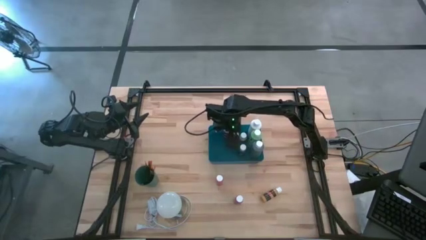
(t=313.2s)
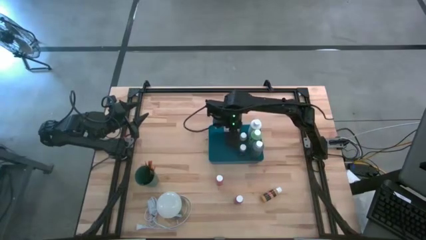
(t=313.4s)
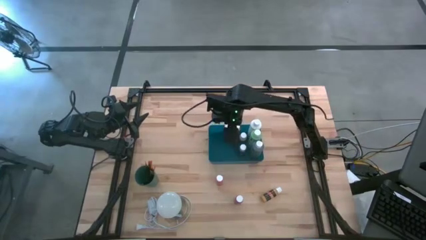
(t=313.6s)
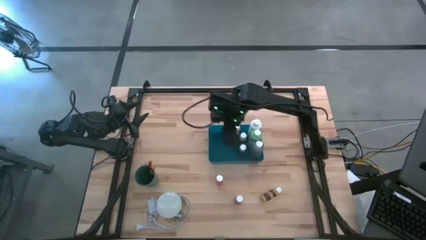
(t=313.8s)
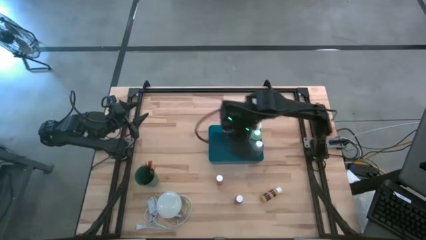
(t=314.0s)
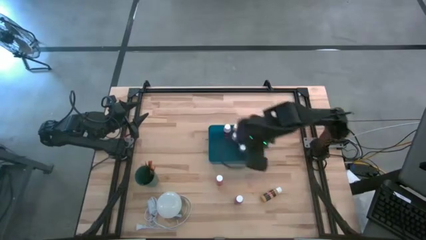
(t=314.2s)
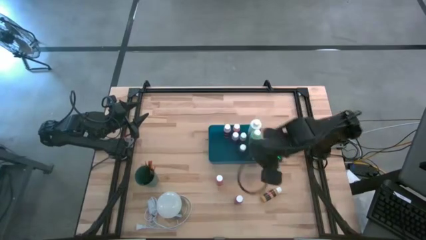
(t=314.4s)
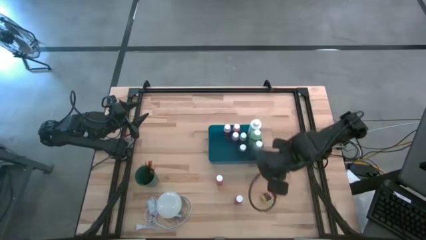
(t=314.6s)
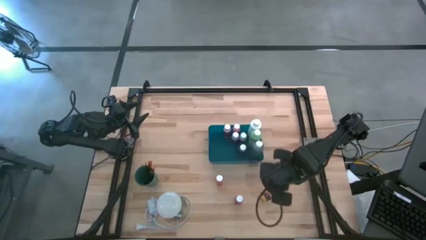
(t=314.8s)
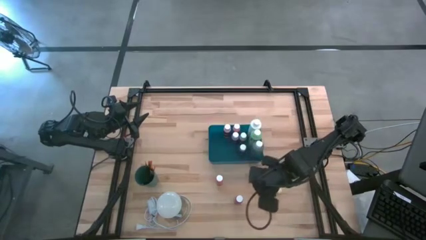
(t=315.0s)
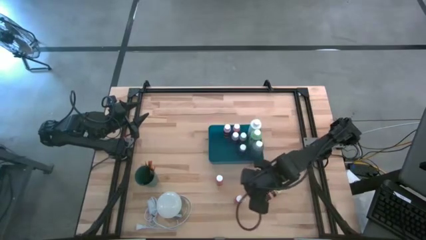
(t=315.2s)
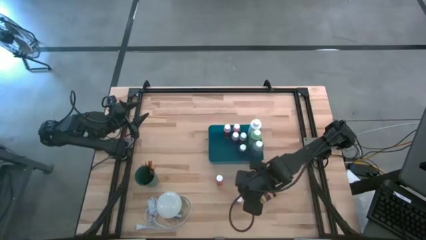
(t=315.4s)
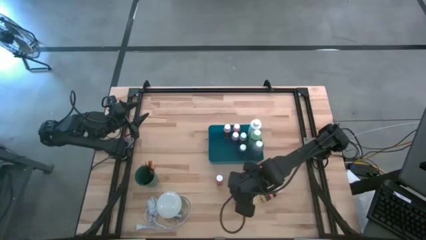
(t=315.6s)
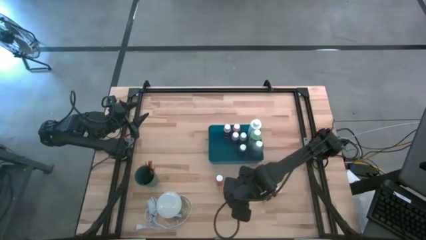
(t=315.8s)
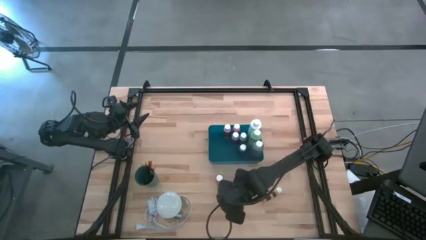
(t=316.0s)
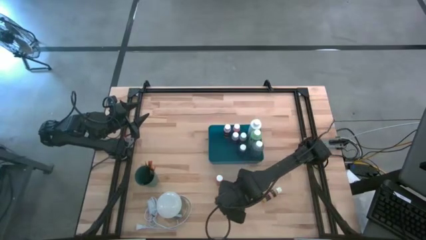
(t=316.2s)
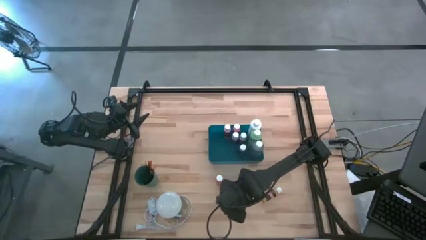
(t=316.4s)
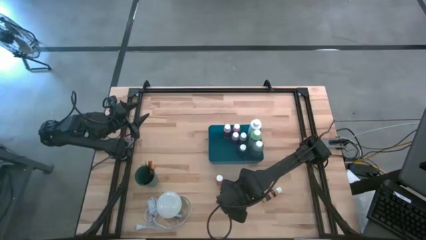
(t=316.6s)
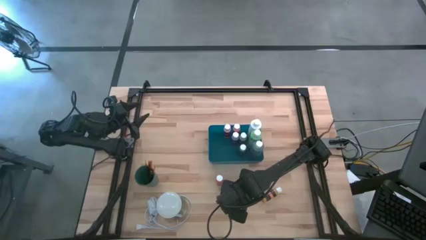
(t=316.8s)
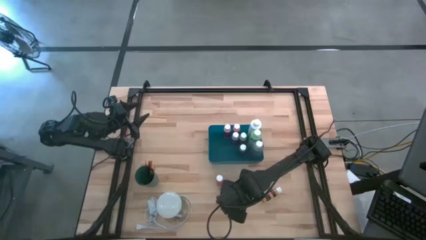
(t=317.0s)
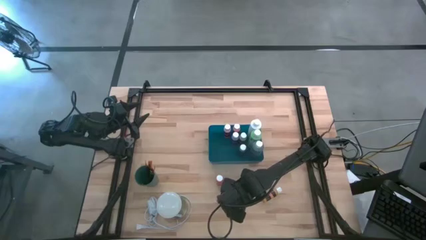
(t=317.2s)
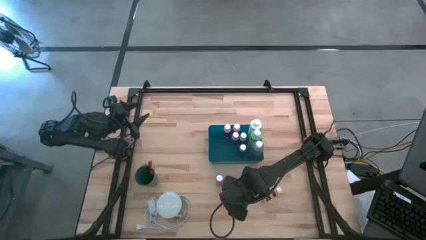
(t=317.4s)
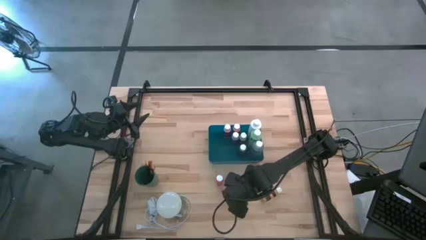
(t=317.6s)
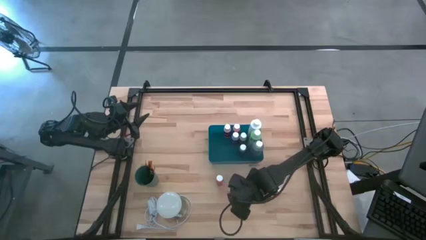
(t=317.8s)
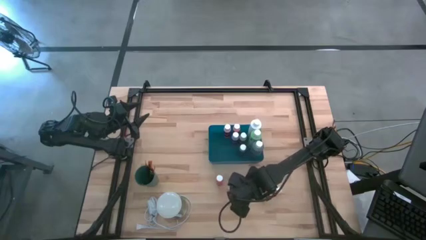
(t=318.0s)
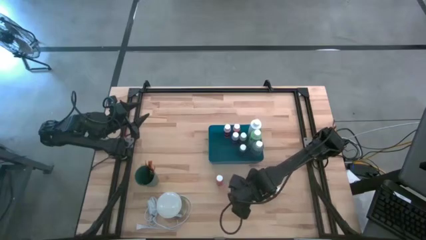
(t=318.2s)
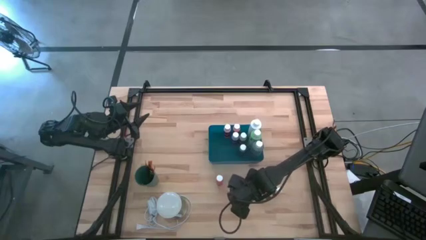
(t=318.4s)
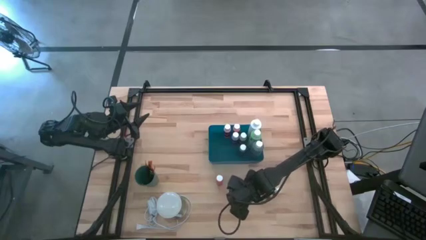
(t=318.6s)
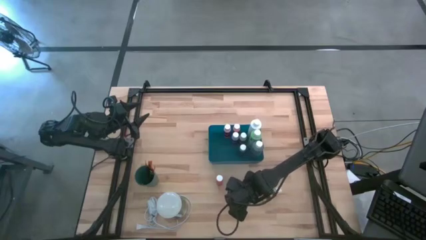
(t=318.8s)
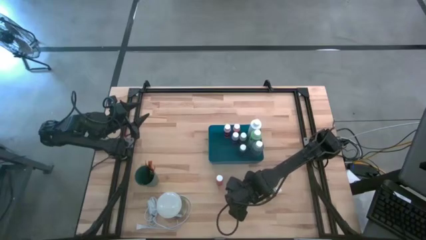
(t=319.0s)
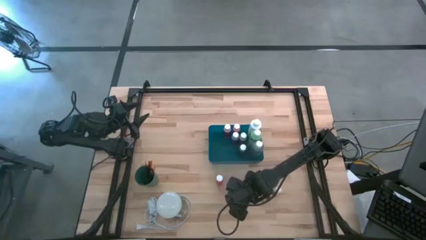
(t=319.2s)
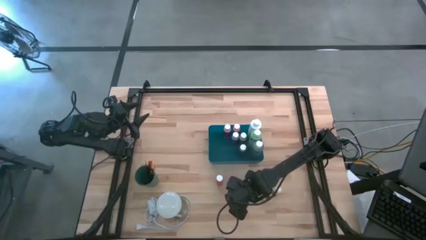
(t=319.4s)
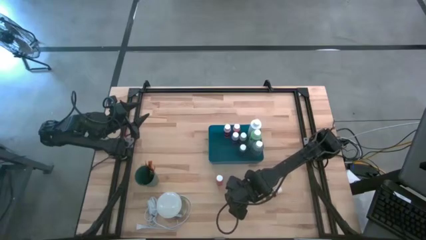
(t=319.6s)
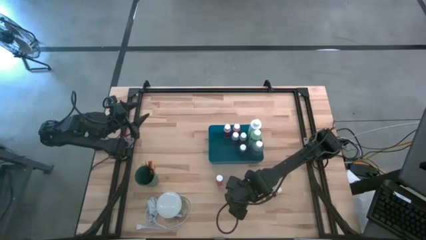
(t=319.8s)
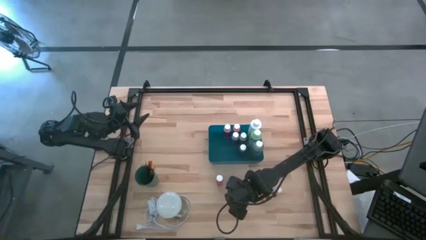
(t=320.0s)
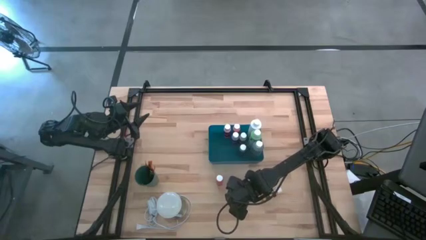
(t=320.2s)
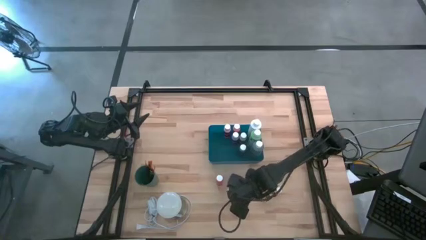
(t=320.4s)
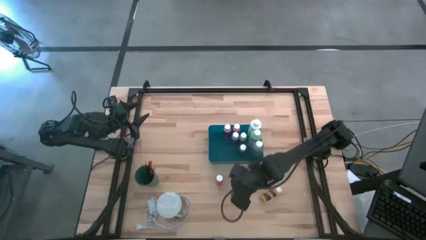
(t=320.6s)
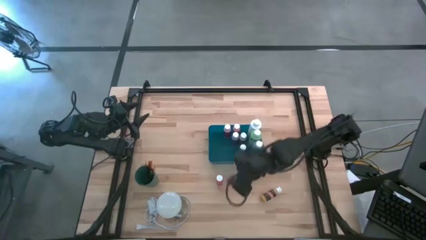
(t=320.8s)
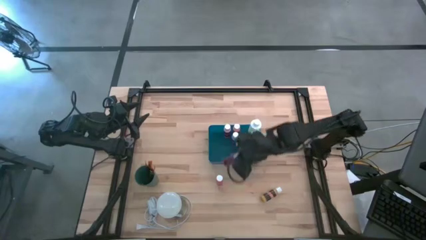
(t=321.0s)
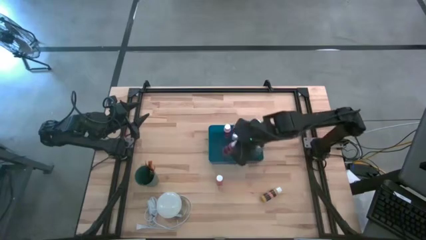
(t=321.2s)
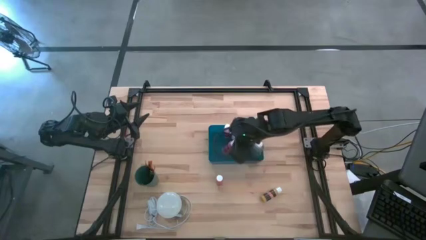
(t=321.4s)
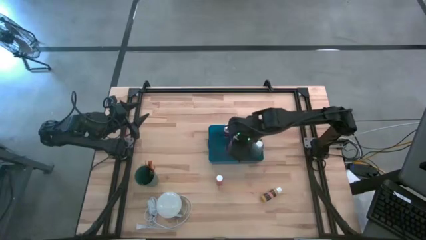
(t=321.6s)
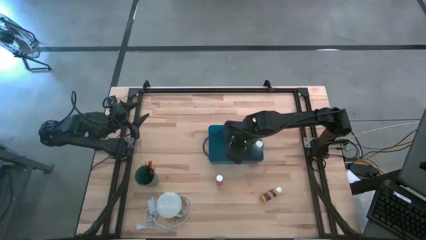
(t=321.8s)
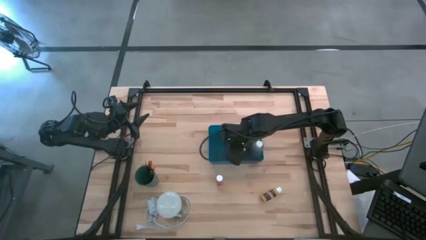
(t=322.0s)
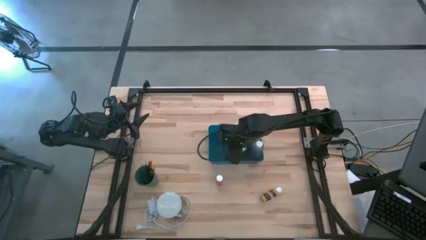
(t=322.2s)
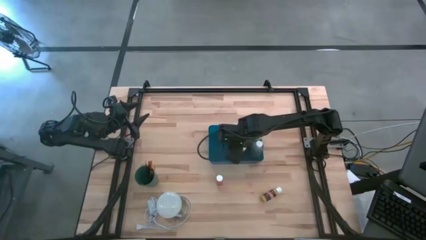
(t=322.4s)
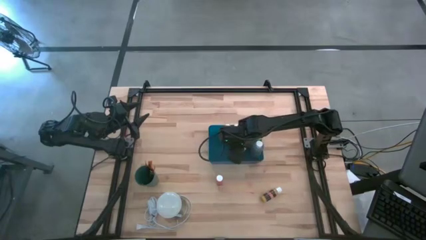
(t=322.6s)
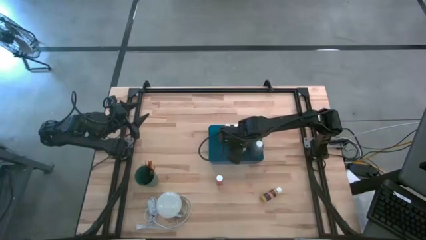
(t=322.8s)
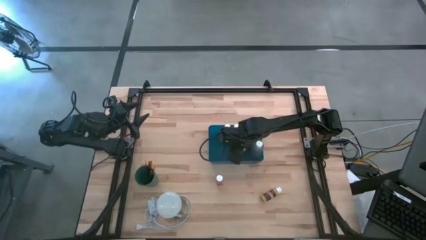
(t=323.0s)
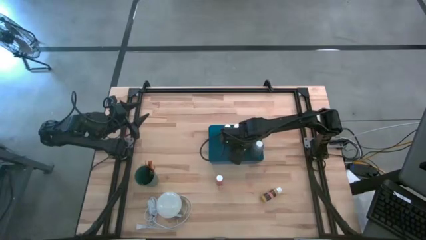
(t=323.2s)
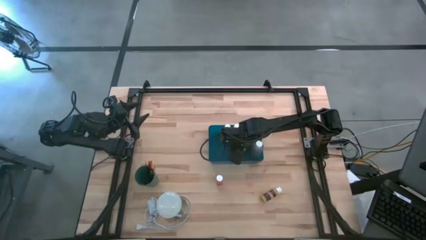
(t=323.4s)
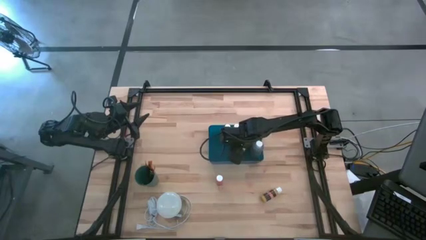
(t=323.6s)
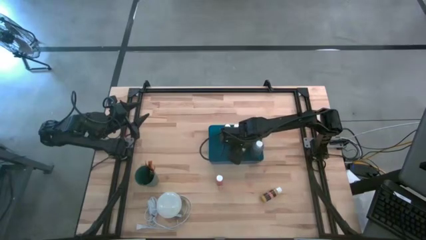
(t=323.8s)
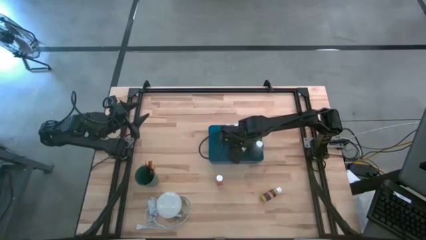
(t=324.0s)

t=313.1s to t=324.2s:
Task: Pick & Place Paint Supplies
Put the green paint bottle into the blue bin

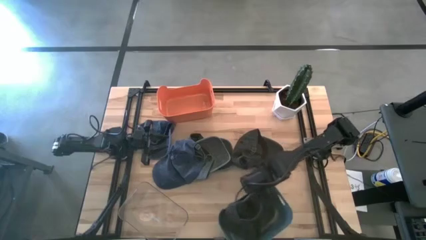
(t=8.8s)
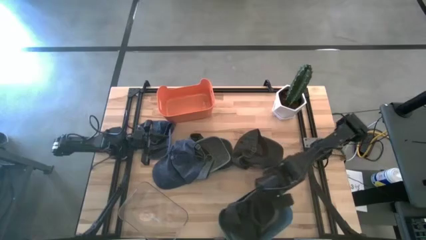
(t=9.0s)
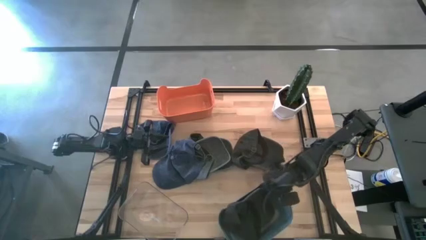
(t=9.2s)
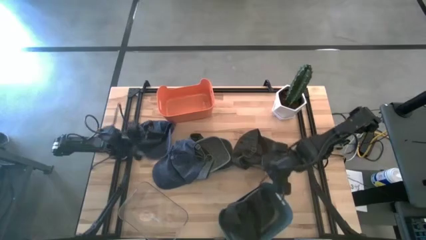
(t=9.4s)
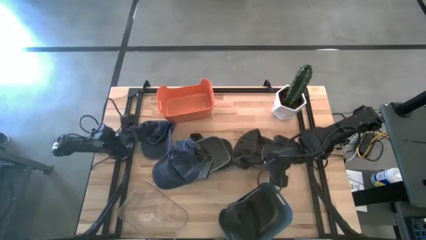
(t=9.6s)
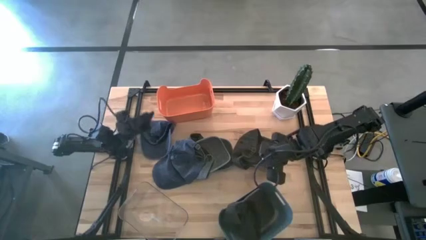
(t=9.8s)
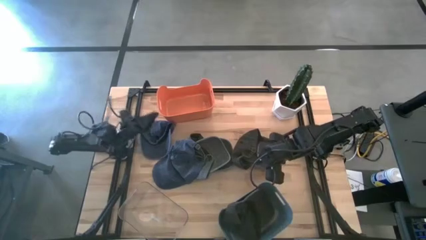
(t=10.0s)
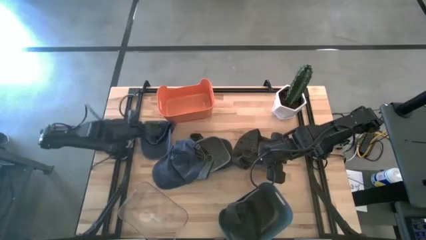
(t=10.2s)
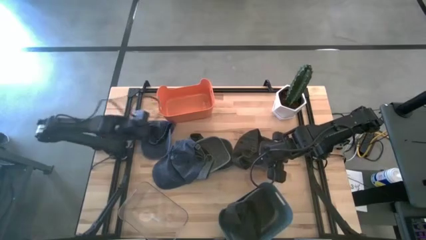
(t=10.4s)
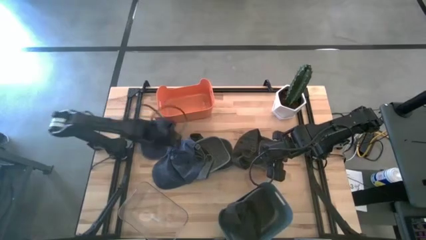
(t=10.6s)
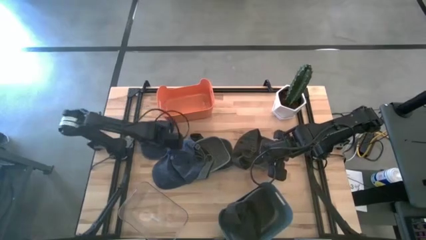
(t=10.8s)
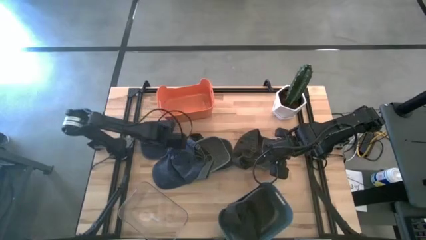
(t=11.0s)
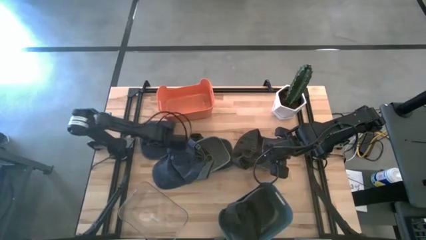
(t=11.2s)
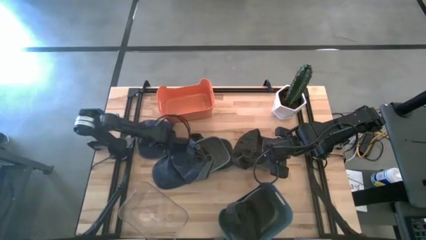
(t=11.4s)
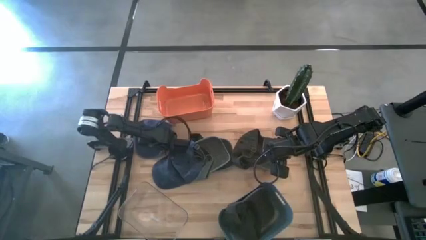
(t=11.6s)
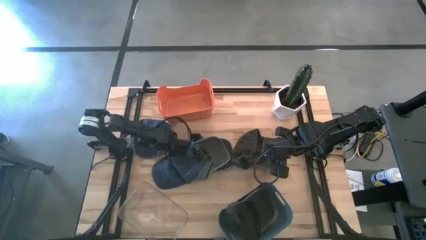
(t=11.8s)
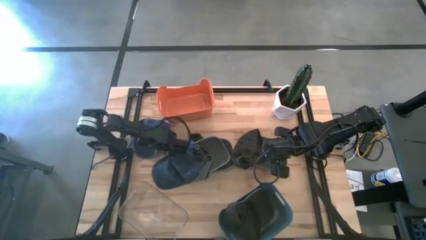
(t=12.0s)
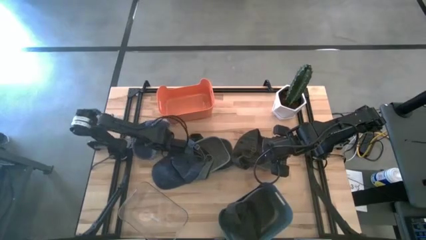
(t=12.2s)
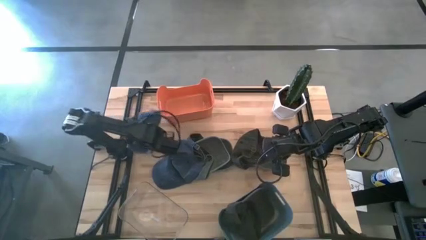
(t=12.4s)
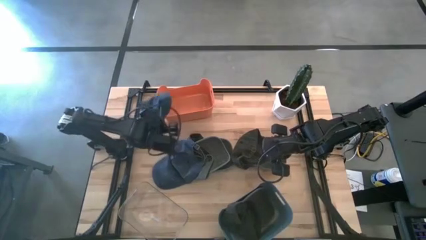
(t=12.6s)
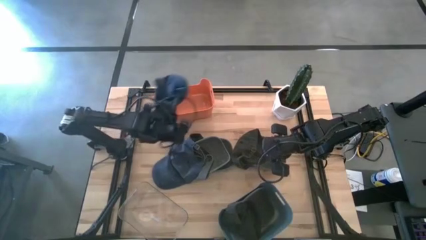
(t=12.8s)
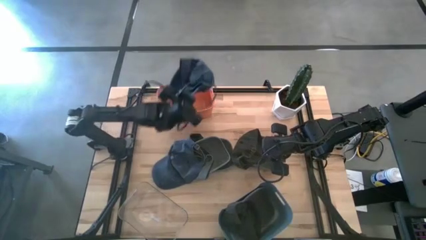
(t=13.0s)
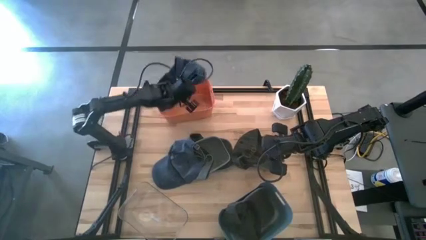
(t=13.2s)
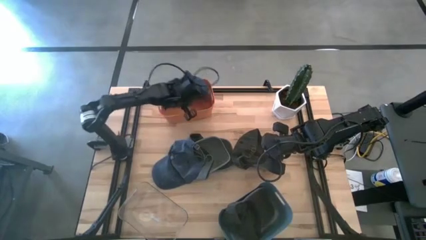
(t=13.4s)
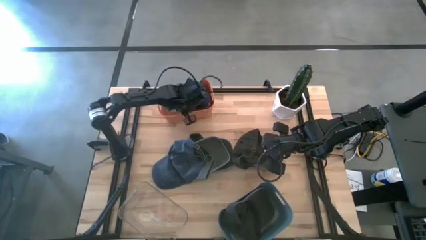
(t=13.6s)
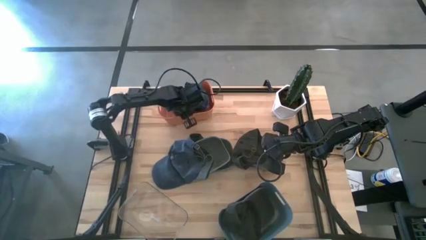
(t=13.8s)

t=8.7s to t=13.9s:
Task: Pick & Place hat
Put the top blue cap into the orange bin
